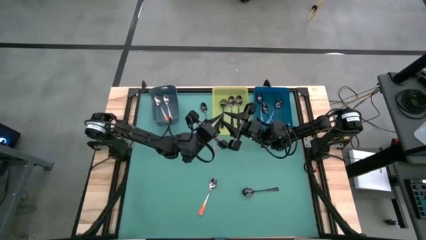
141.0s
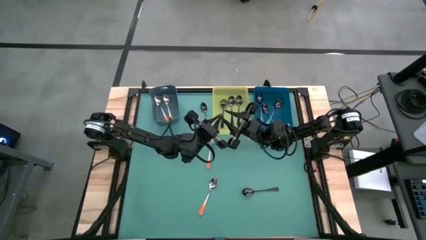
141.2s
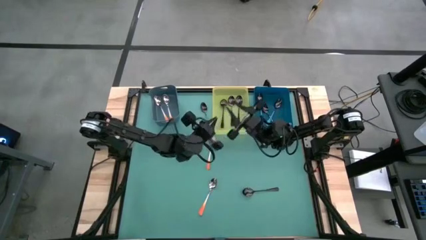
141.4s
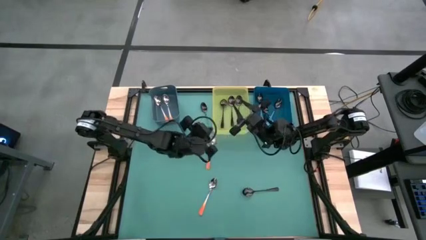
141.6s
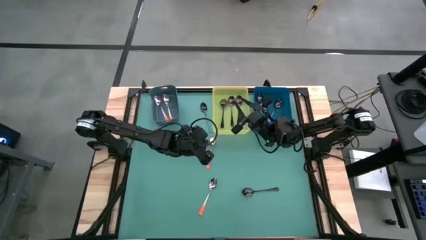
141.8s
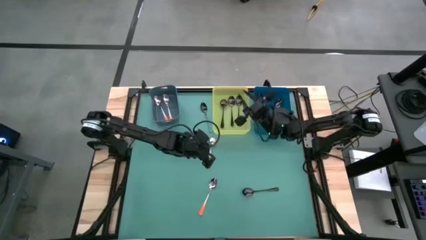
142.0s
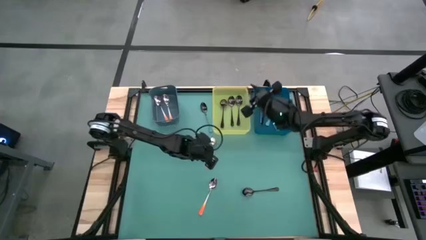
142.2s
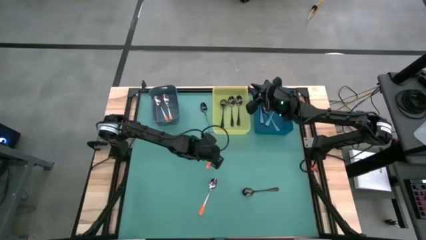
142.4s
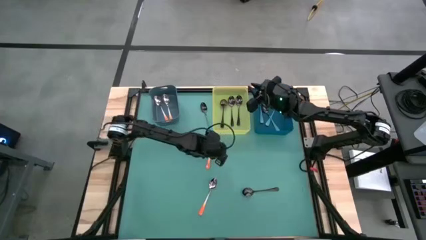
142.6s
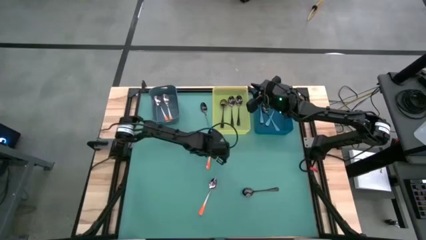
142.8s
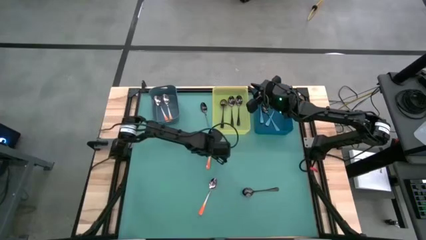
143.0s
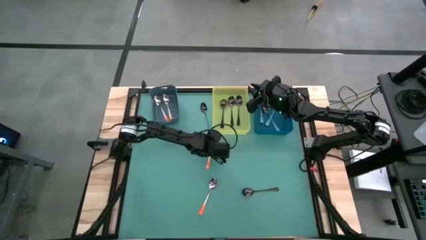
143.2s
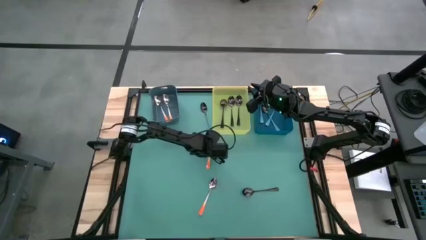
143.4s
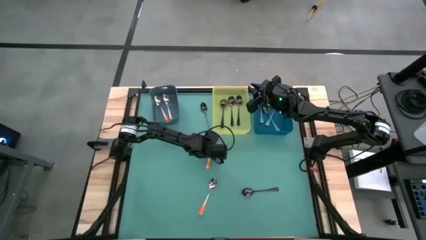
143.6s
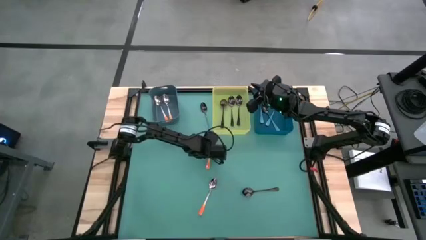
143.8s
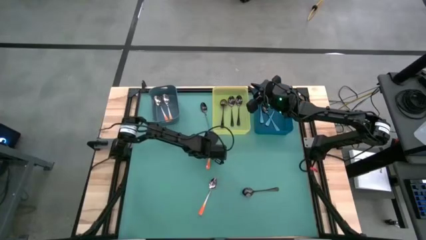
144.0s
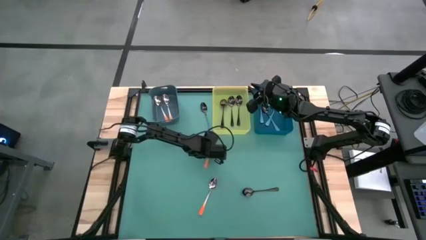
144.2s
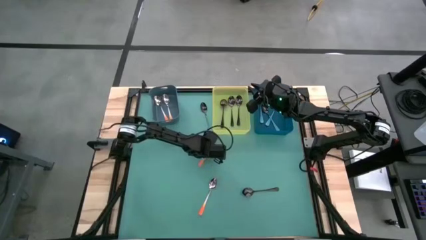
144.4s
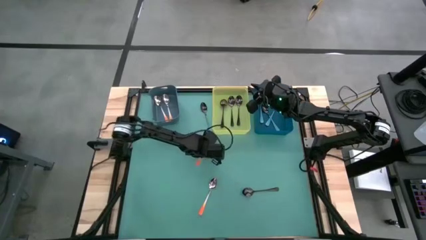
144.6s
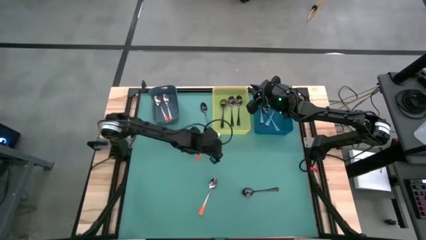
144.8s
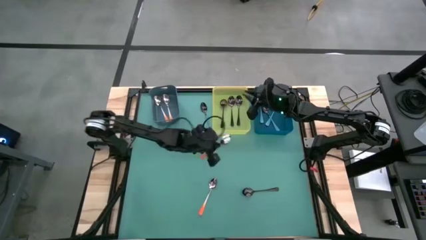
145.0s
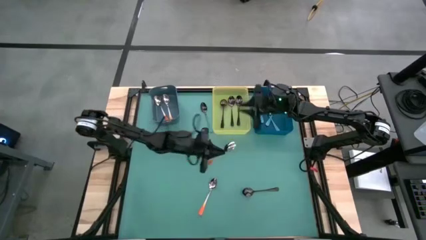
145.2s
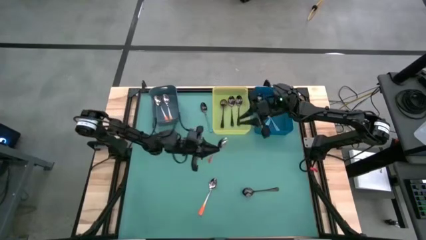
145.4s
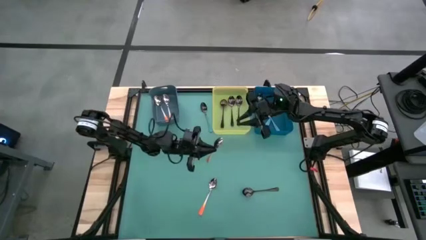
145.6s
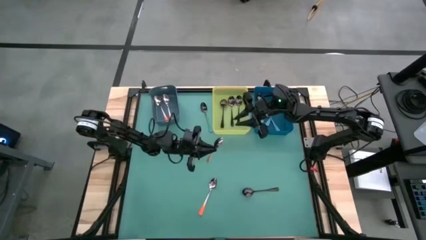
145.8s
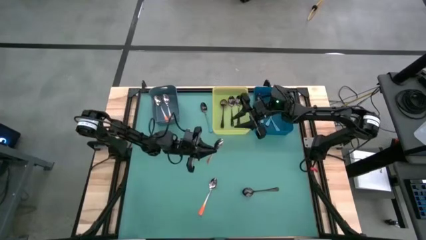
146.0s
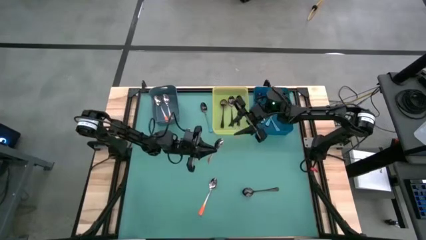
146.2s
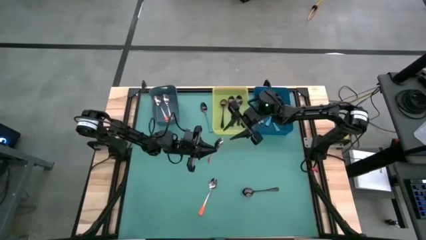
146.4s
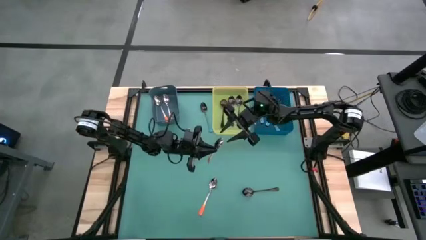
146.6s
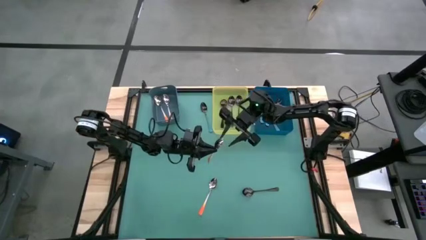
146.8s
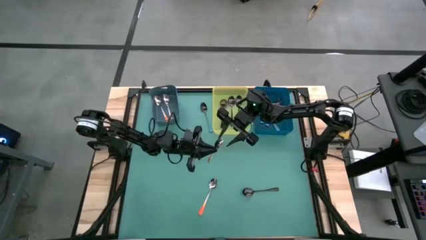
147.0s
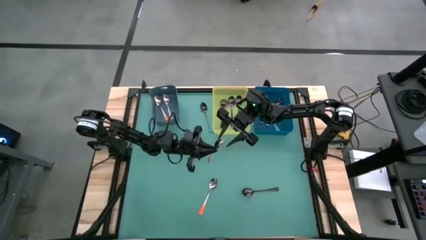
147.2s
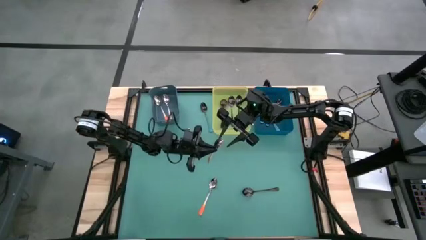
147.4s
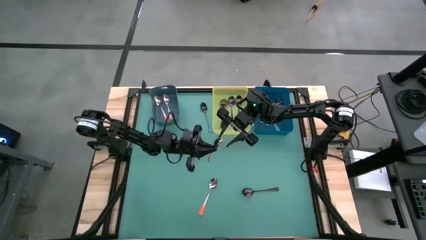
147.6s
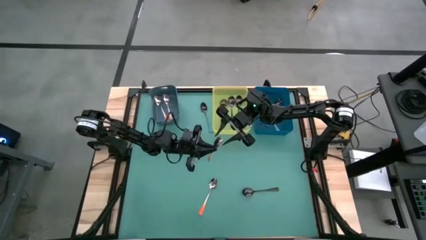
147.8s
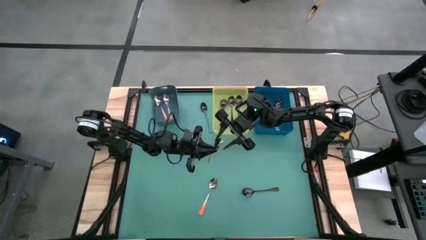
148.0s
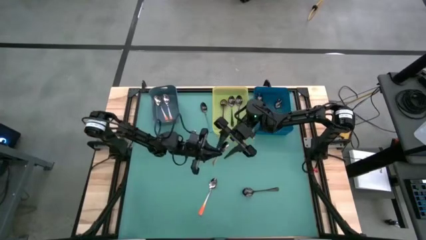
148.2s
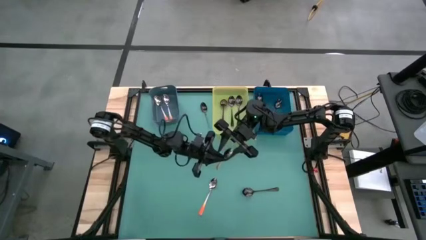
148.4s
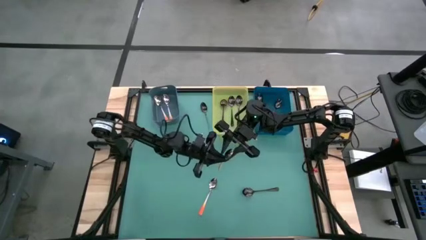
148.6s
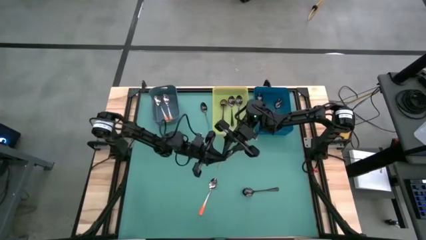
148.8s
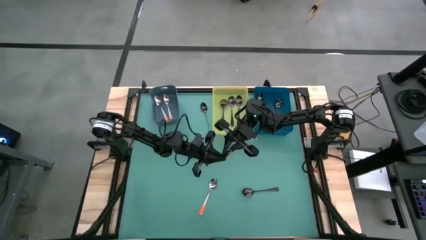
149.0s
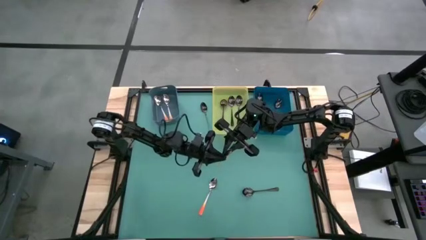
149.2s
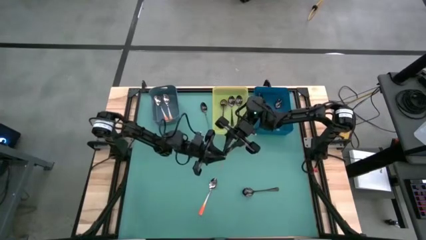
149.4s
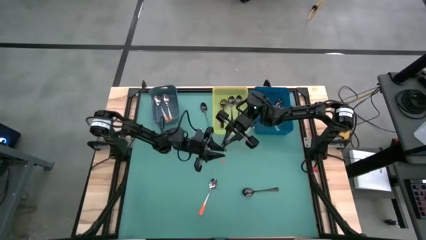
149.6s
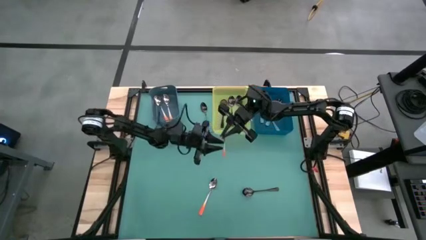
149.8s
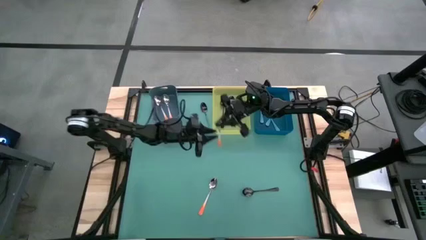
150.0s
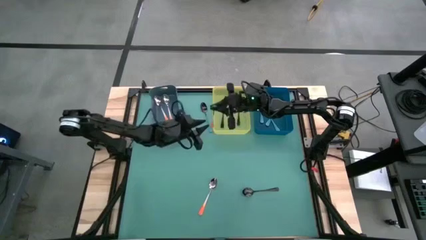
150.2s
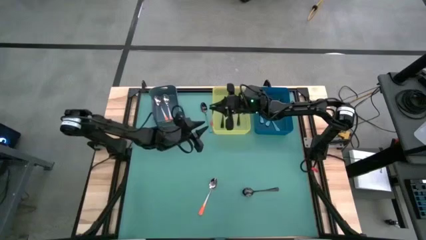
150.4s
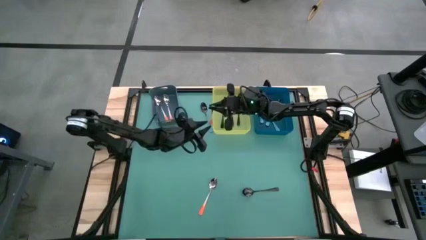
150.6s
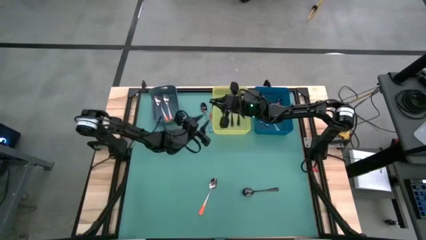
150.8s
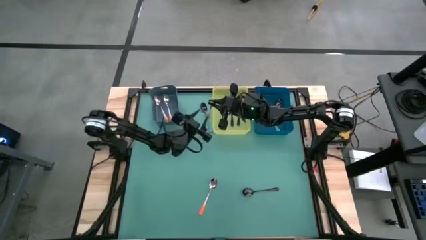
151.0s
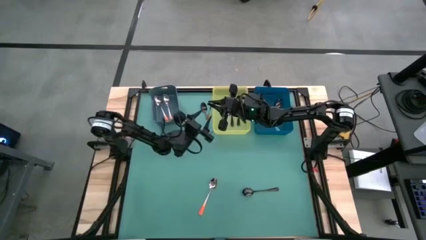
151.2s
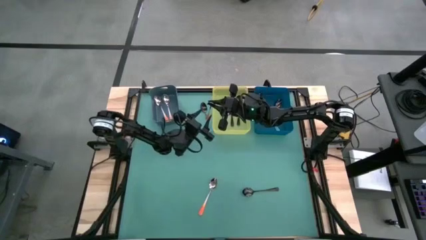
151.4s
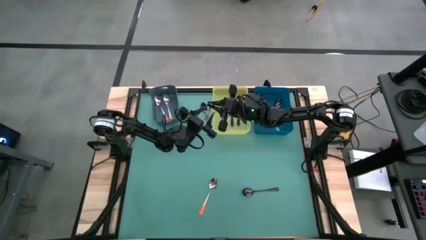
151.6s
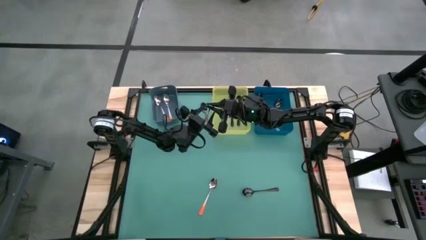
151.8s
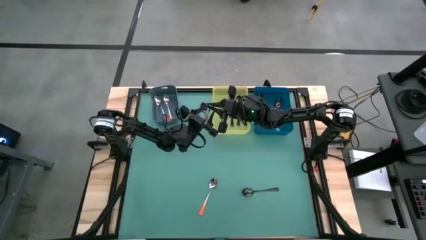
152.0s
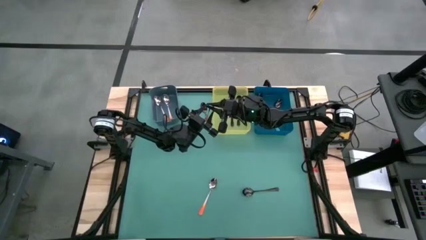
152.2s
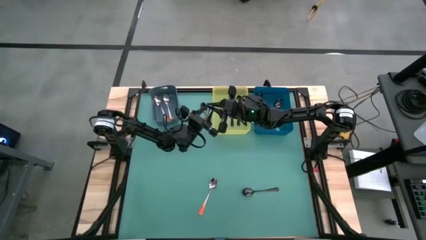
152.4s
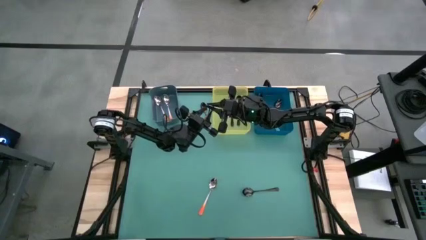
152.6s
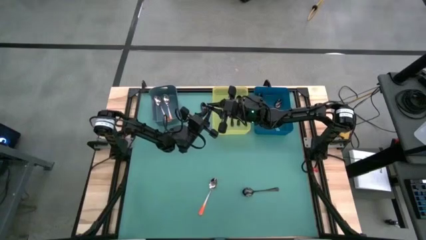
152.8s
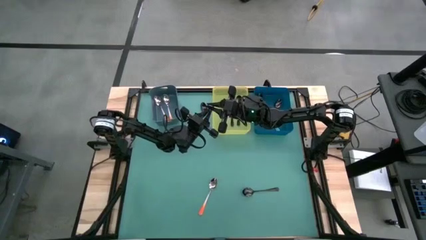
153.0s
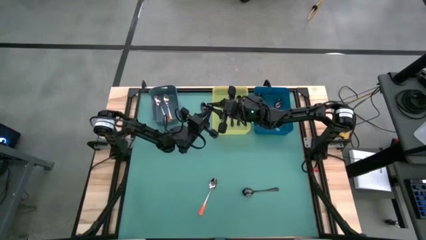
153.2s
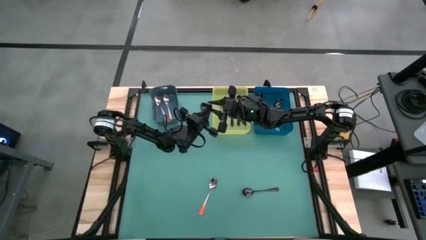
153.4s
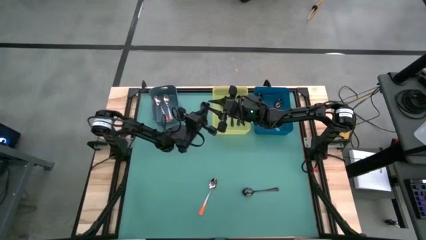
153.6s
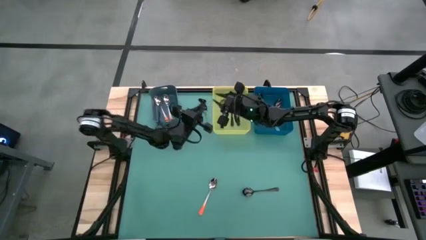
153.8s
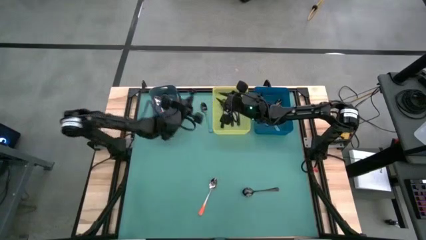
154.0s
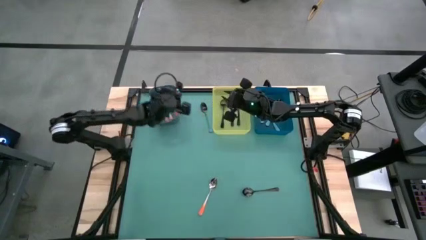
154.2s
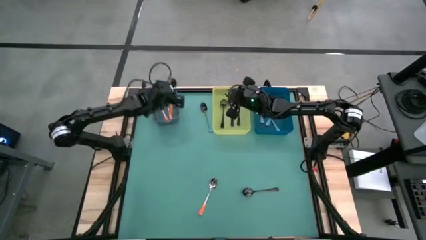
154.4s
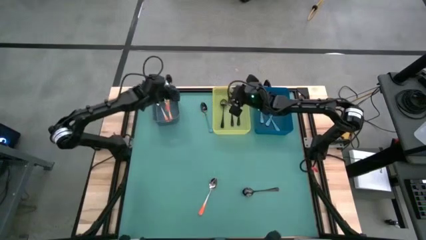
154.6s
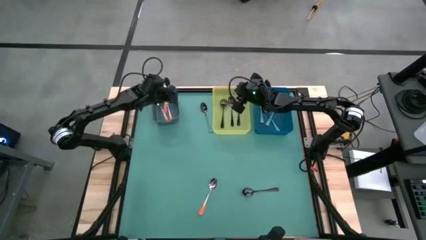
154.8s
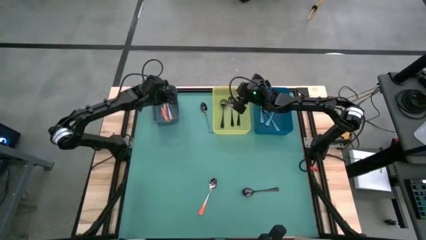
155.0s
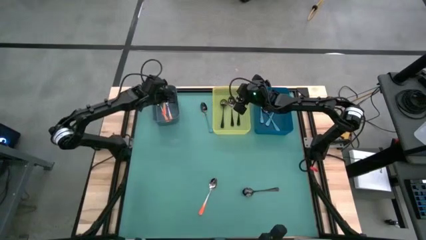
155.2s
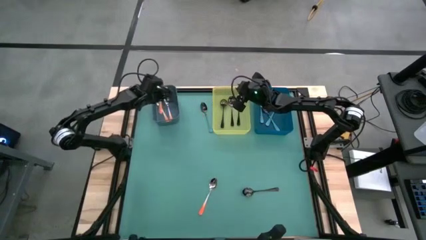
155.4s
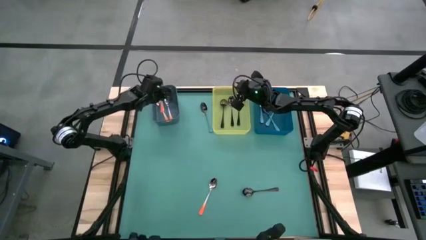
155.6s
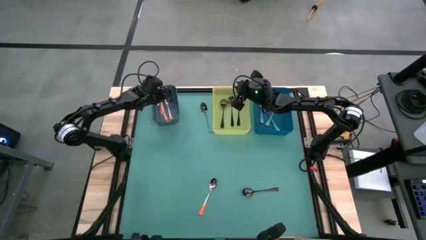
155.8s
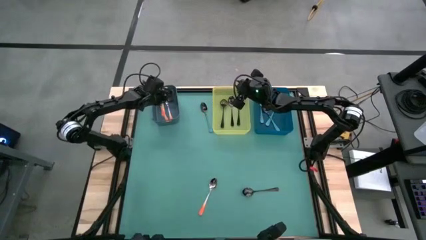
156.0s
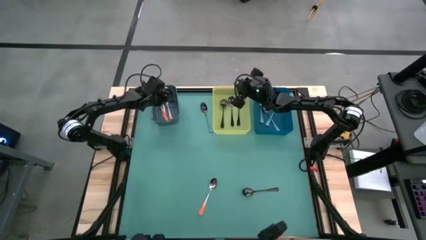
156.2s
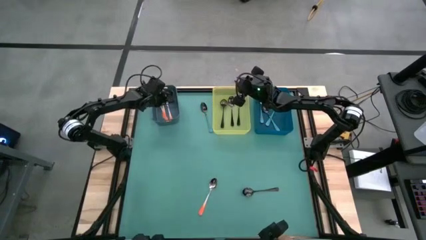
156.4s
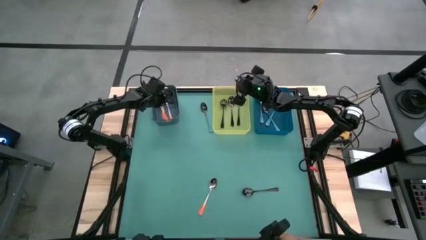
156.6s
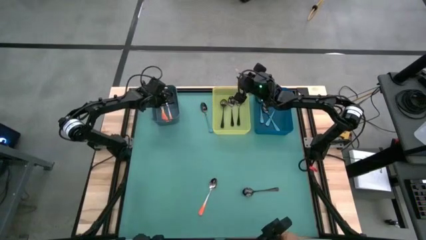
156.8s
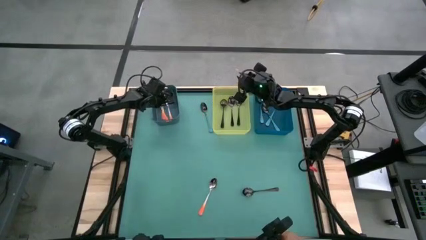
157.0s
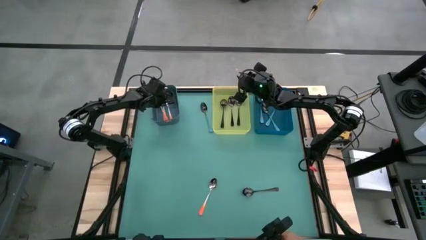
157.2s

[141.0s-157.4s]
Task: Sort silverware by color (type)
Put the orange spoon into the green bin
